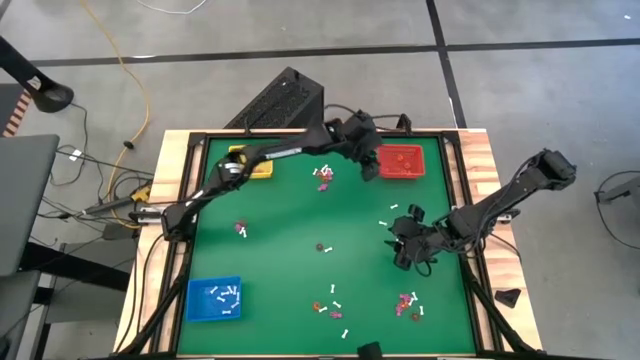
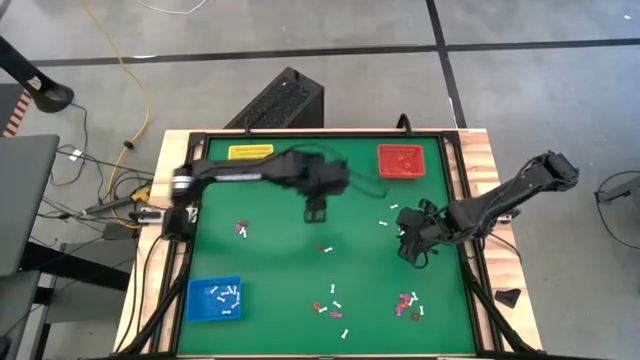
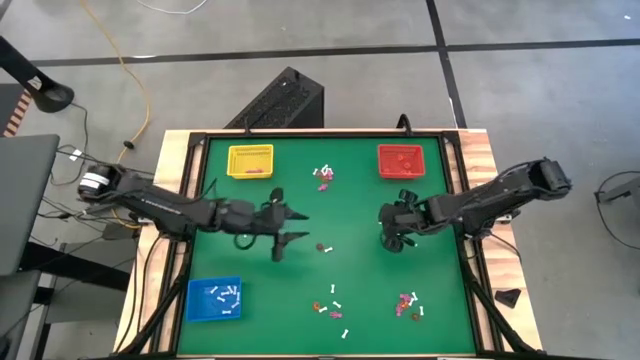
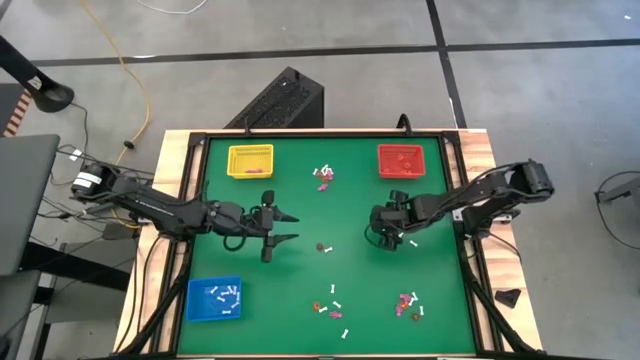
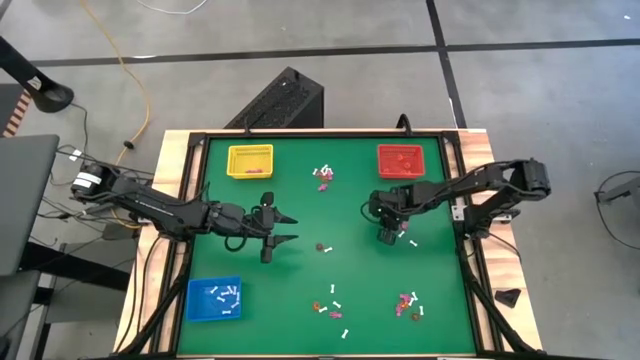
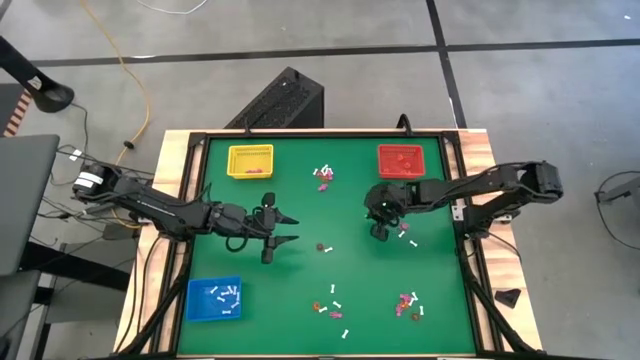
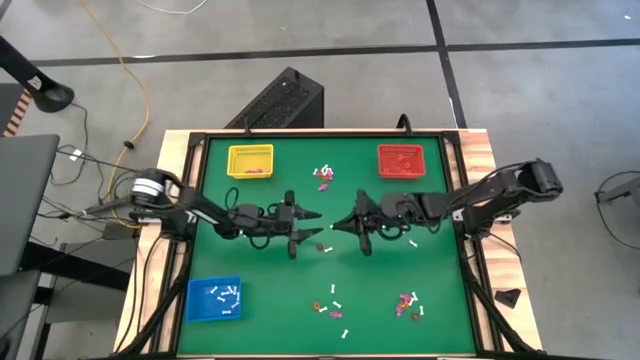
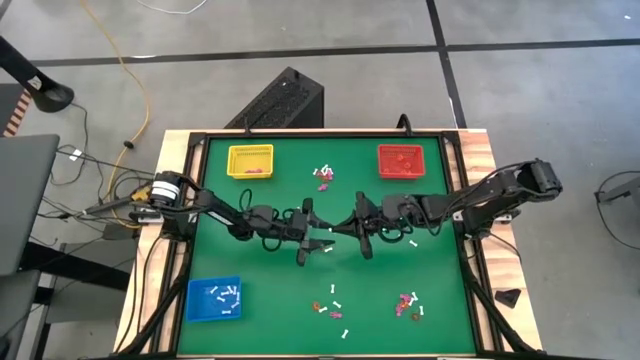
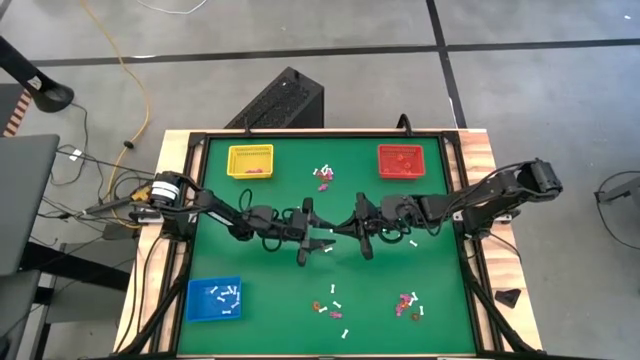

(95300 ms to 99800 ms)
Task: Sort Halloween decoration
Put the white bone toy into the blue bin

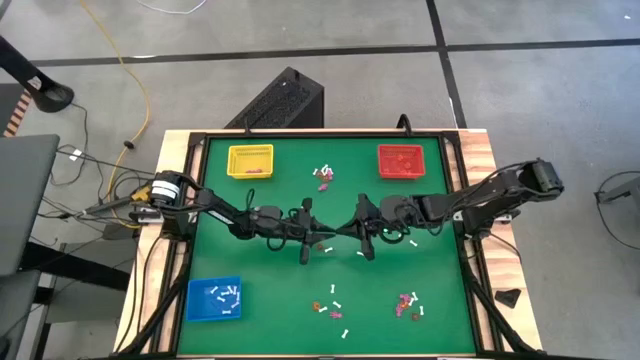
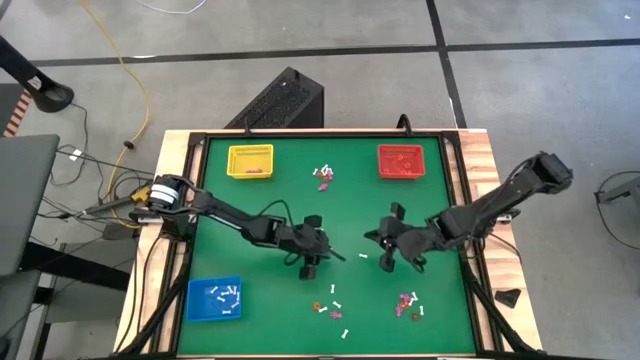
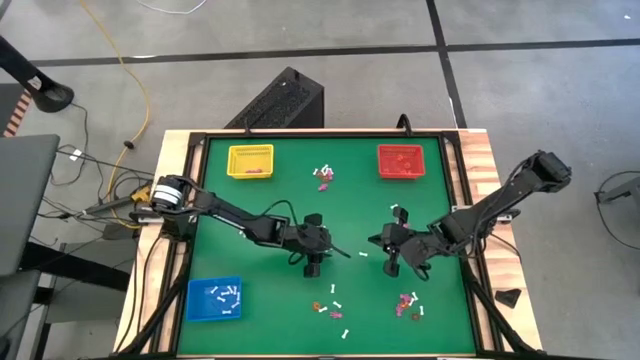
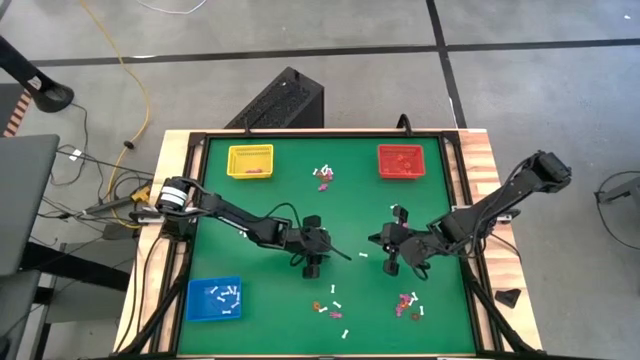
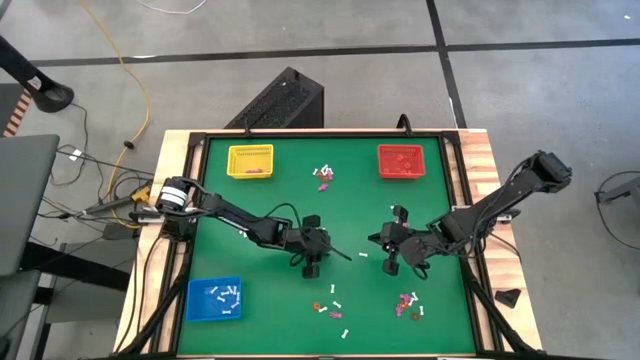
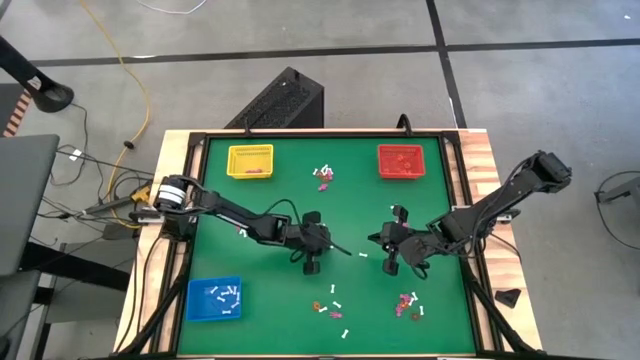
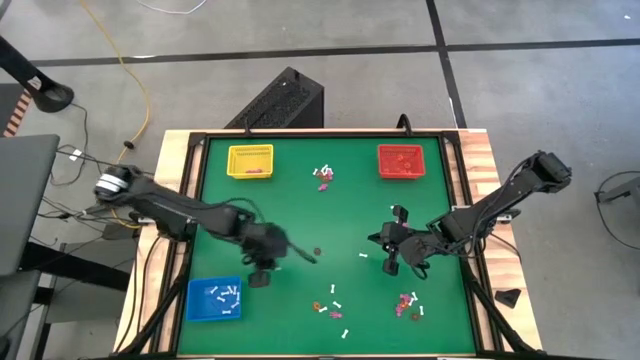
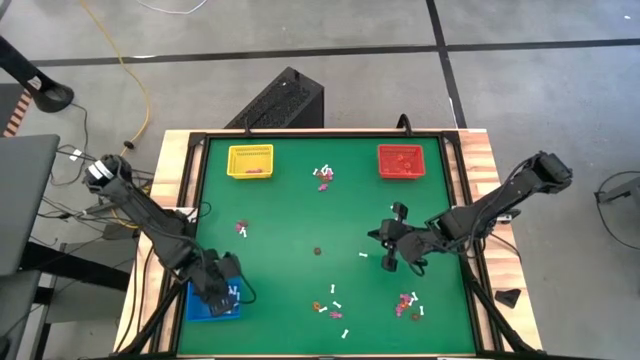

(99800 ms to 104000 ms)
Put the white bone toy into the blue bin

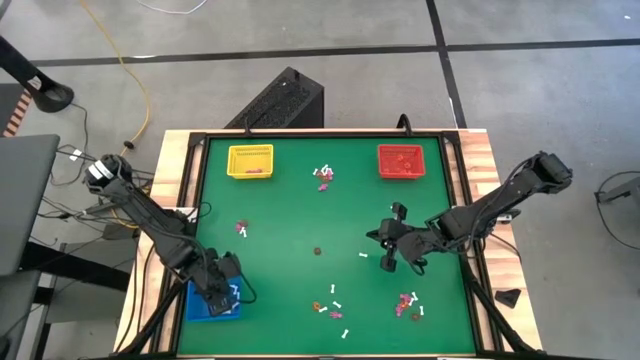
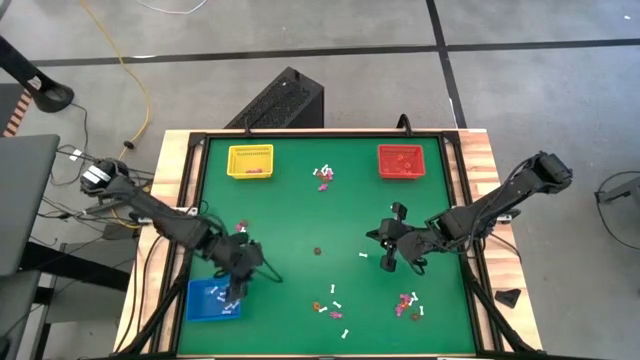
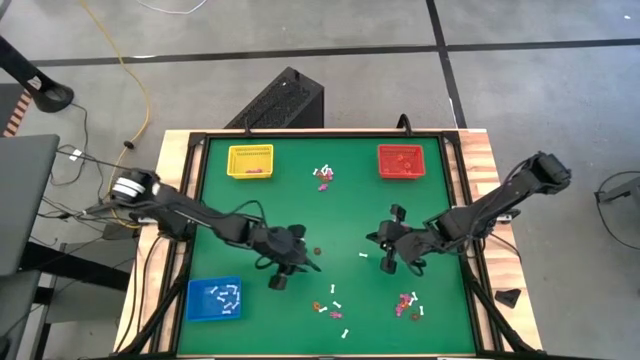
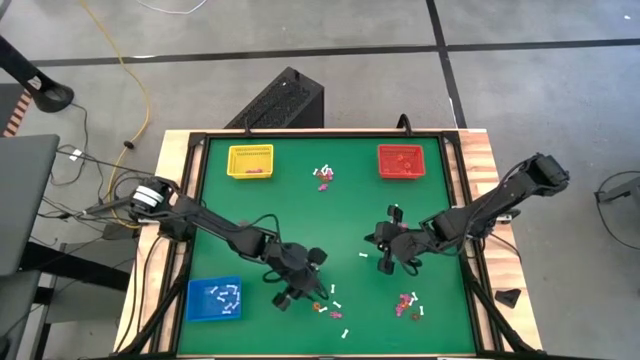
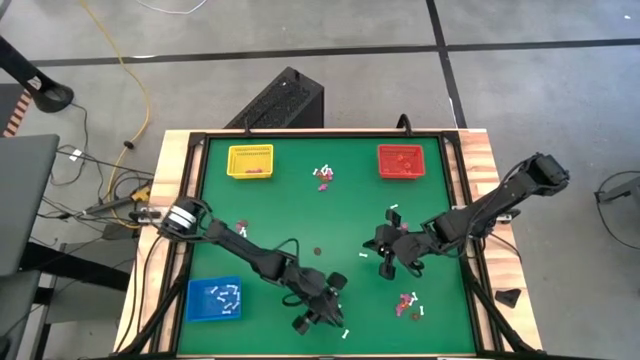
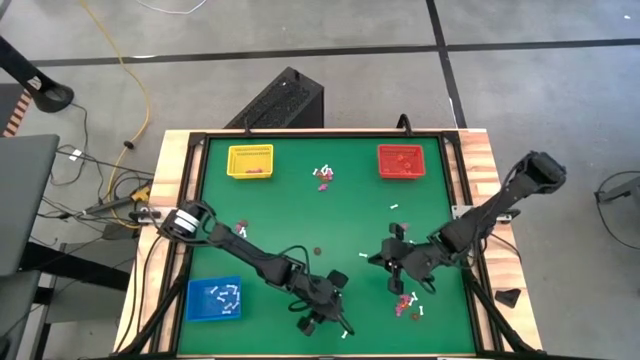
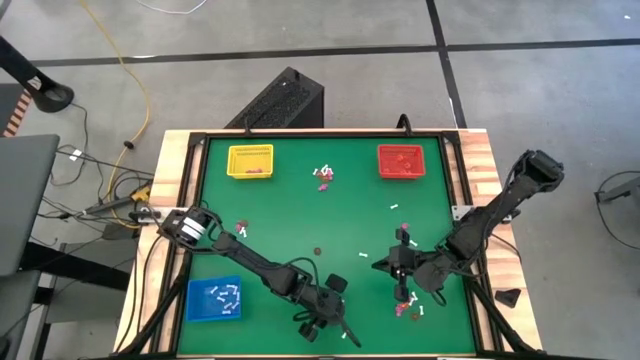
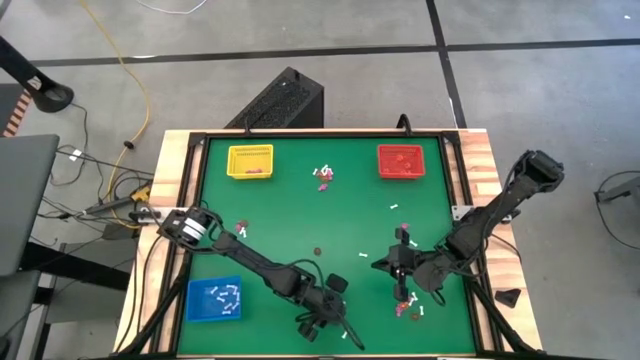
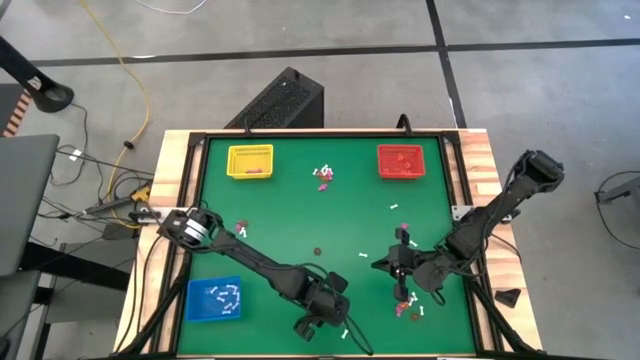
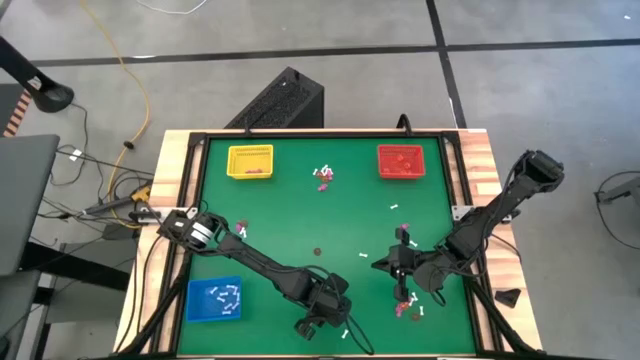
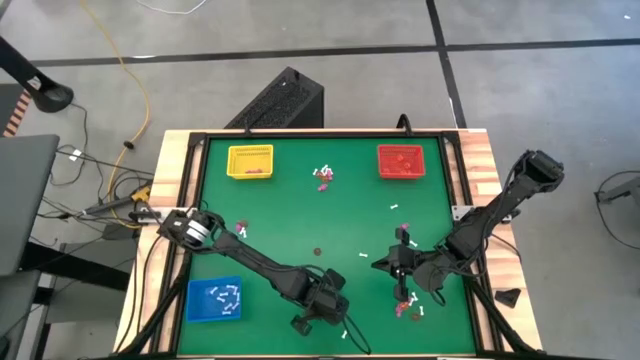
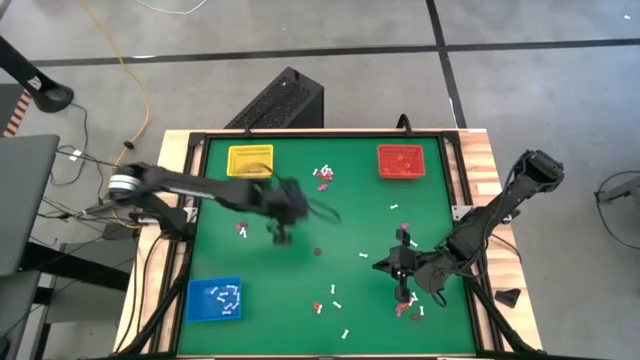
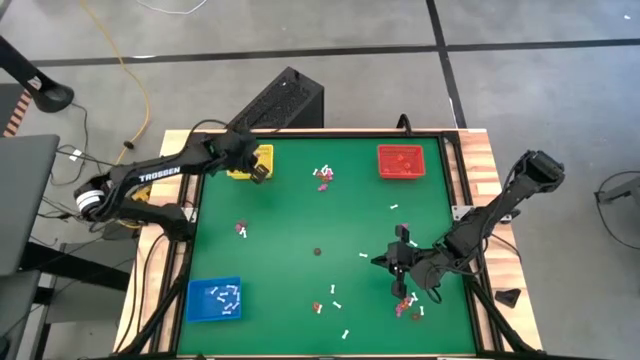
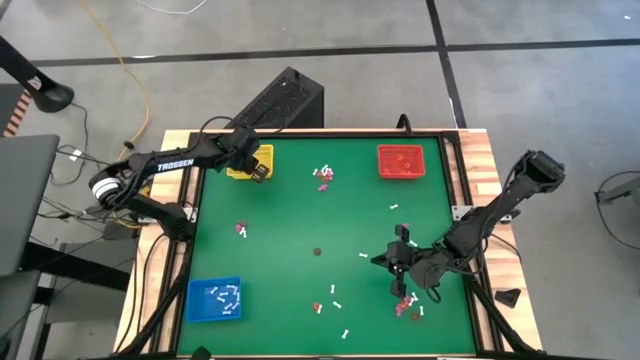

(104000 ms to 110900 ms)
Put the pink skeleton toy into the yellow bin
